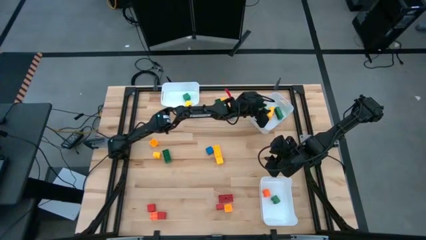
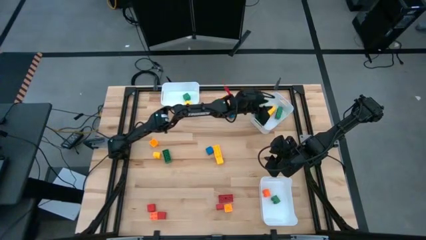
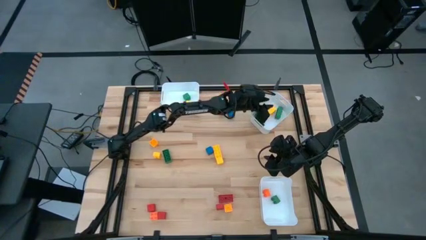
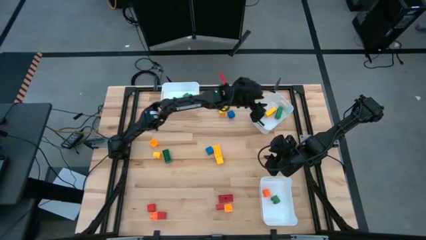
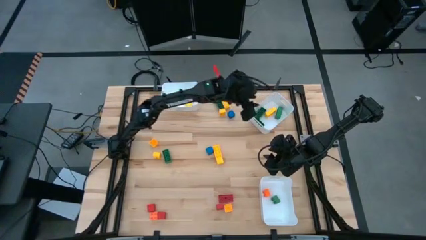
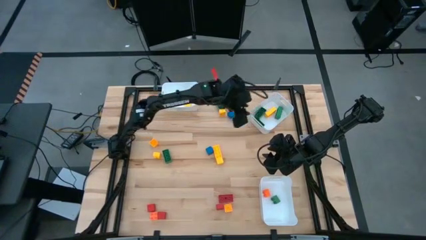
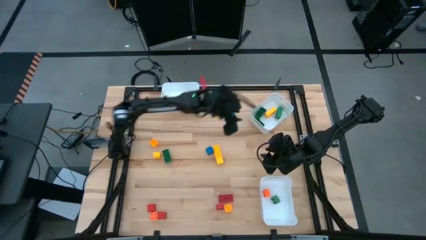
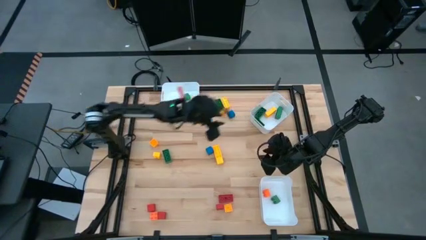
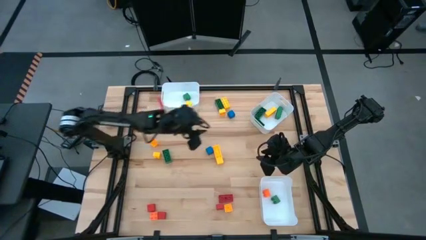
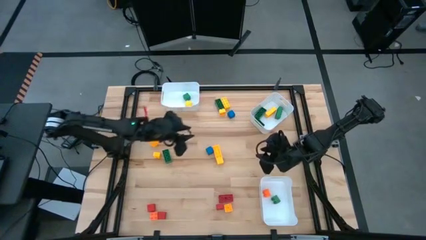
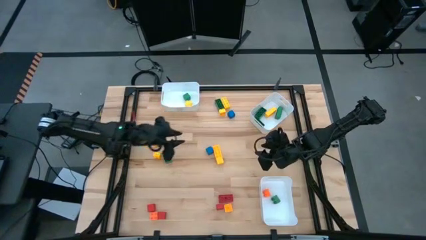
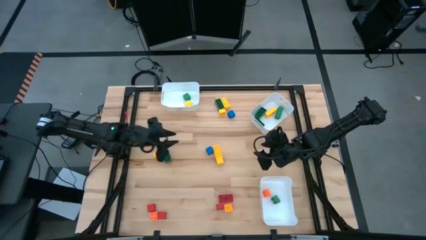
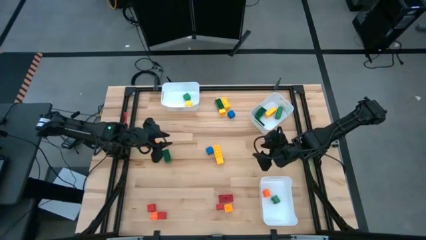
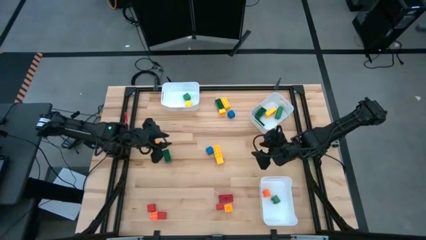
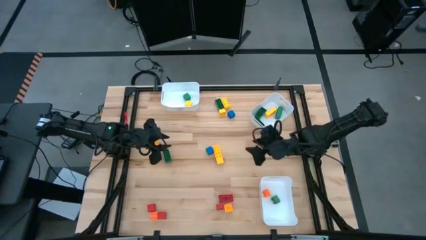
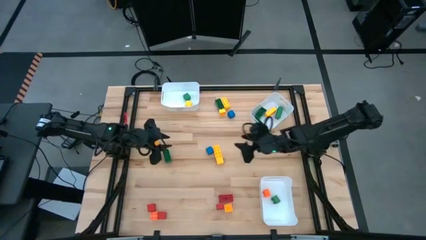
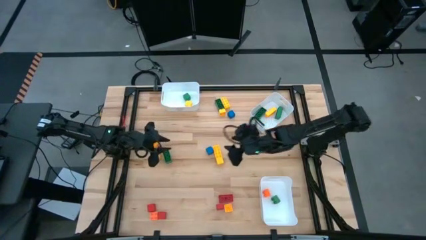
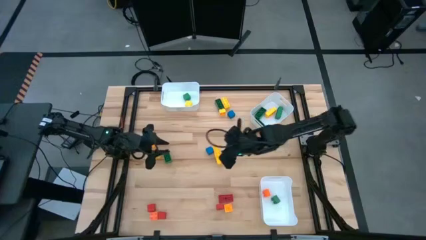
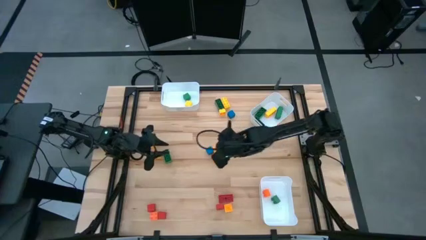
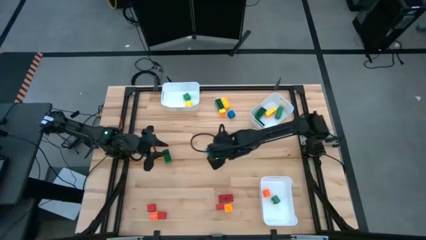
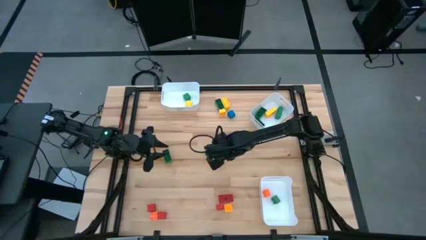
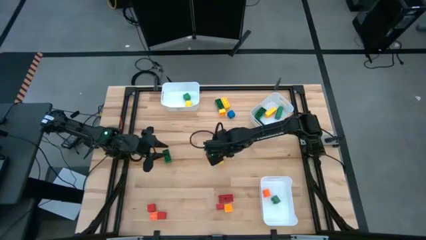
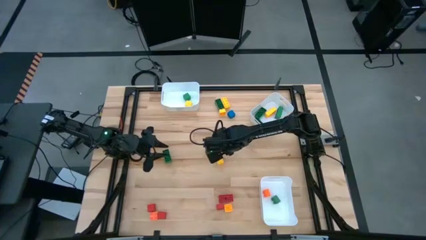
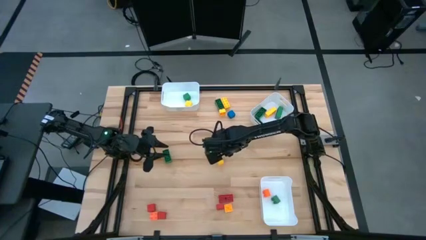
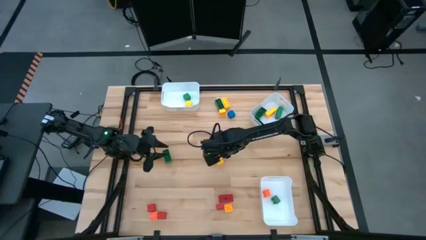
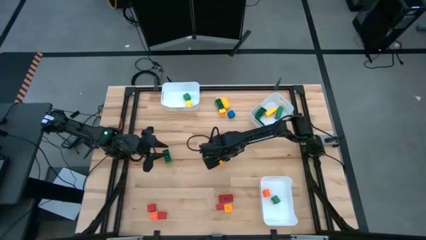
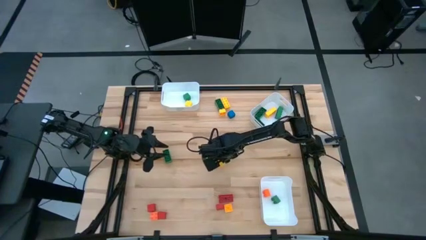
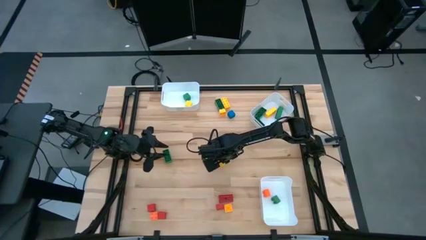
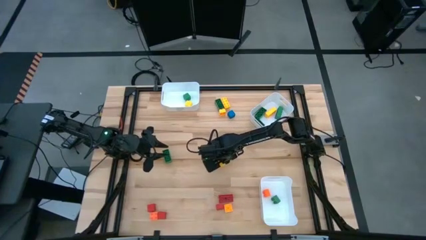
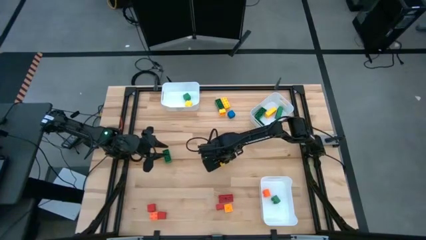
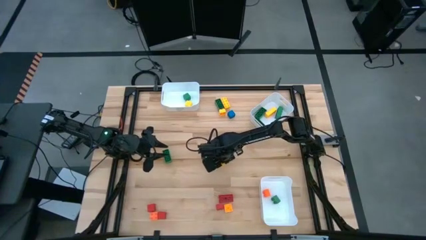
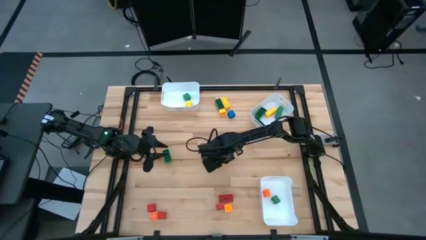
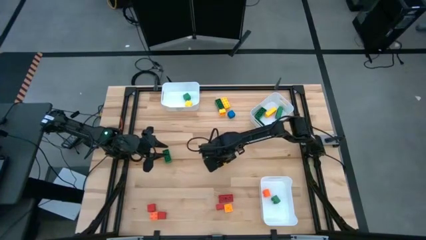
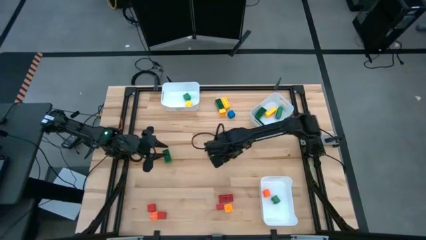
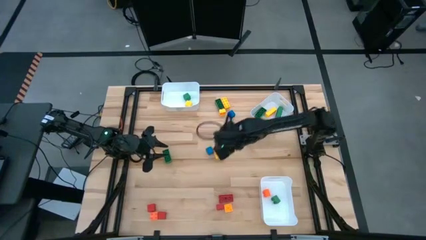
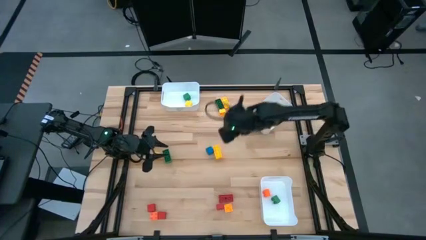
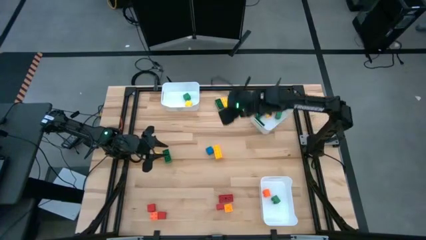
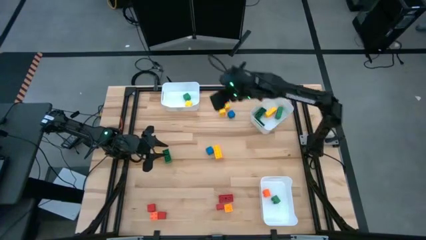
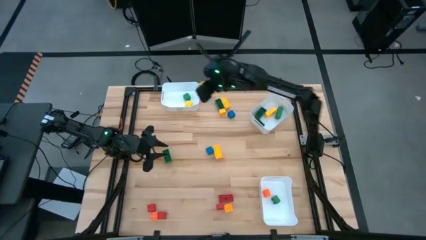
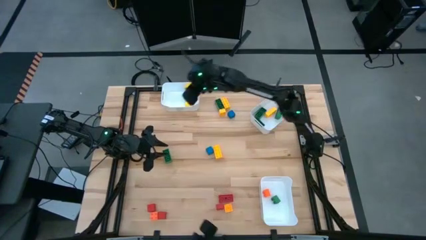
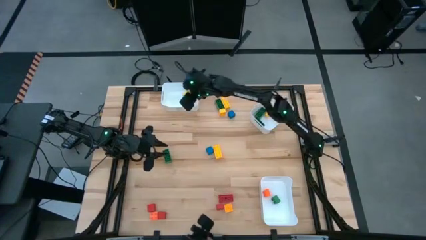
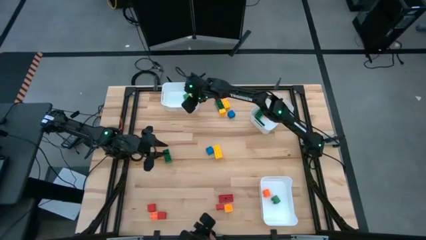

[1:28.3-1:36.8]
Task: Sort blocks by size
Put the yellow square block into the top left white bin

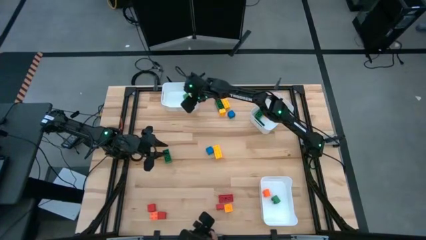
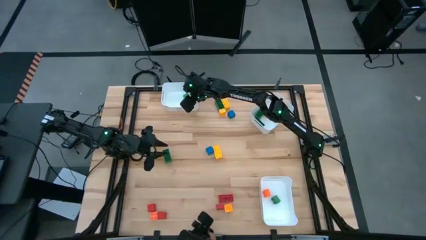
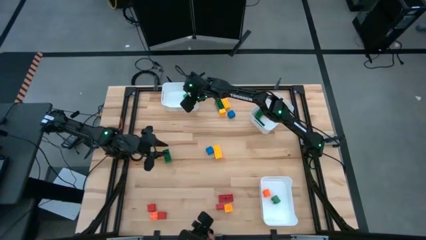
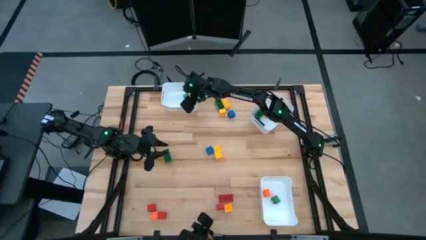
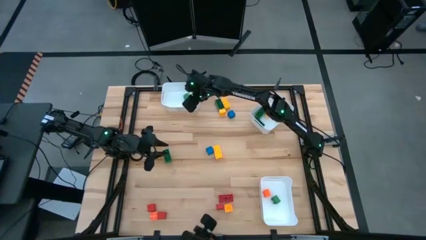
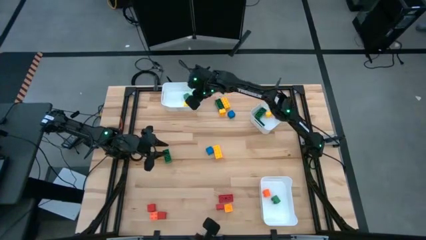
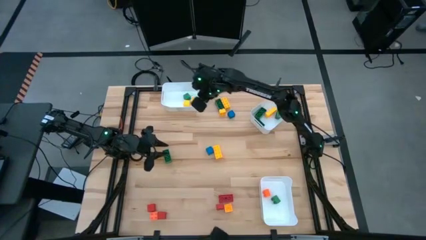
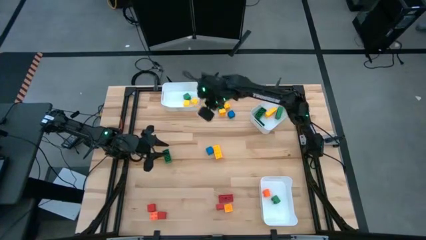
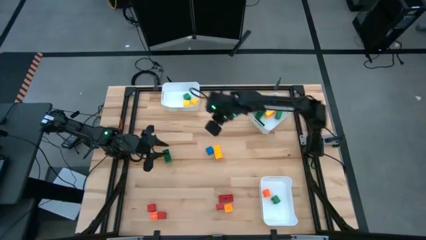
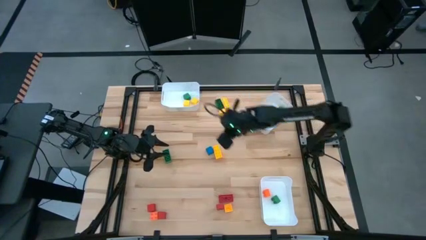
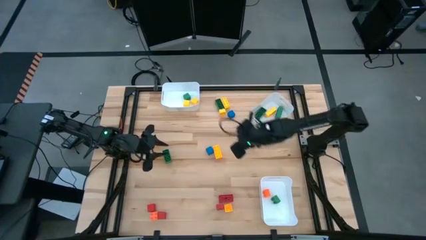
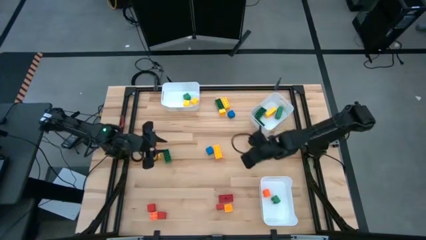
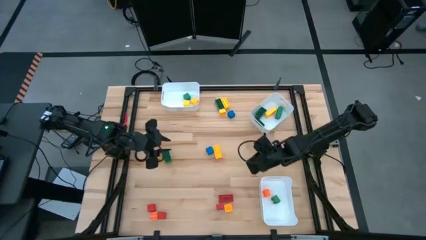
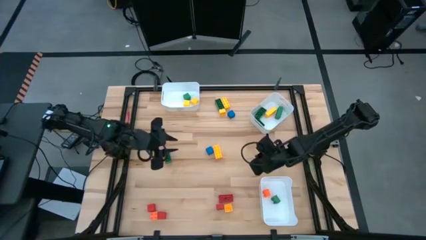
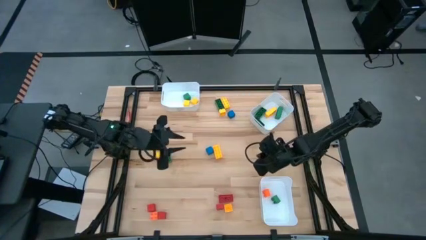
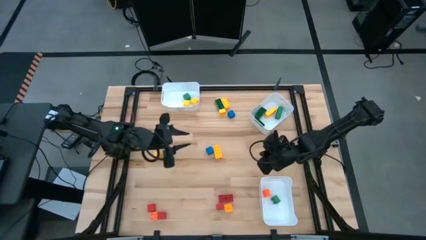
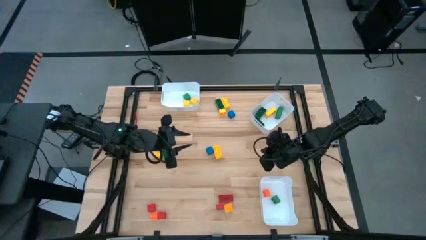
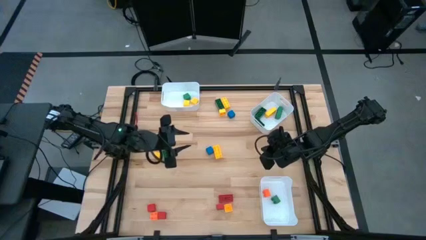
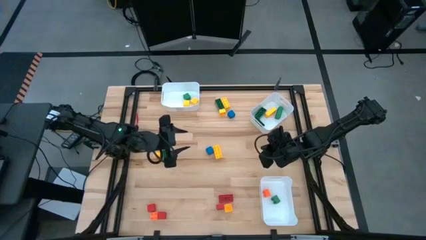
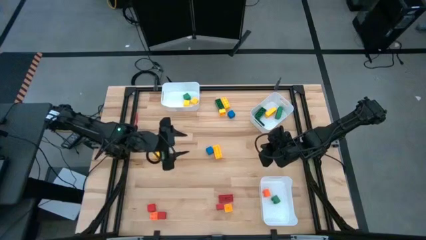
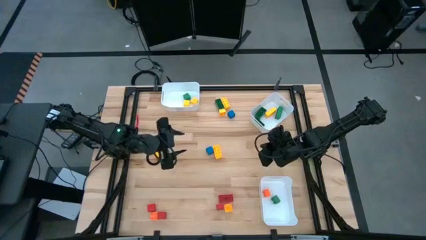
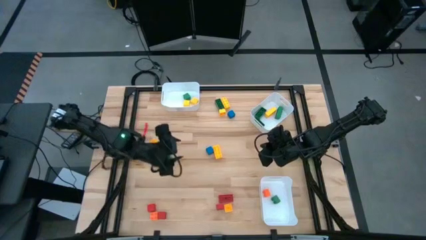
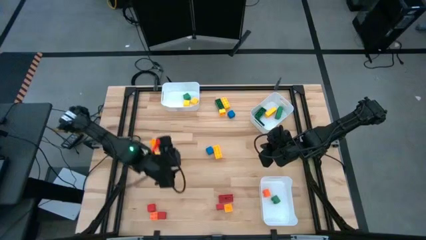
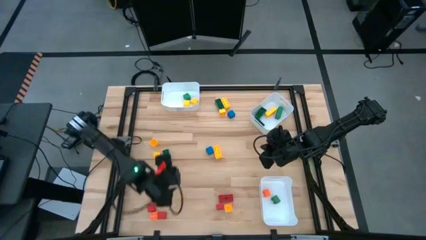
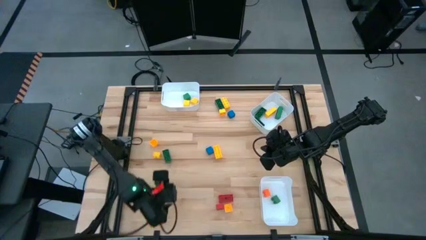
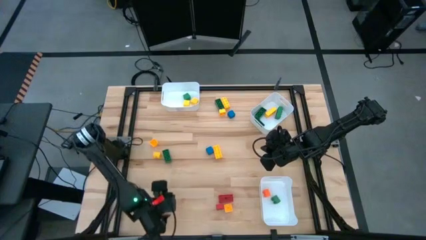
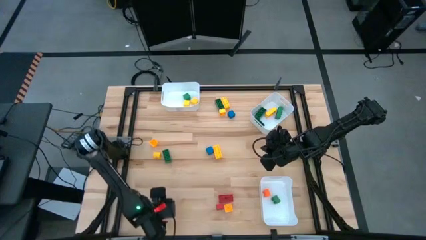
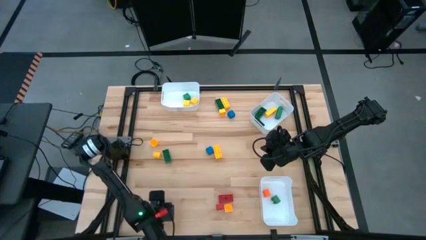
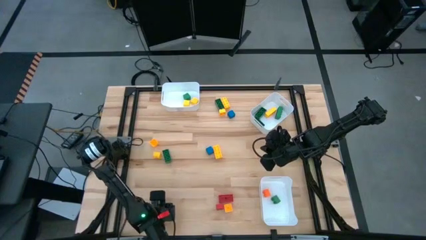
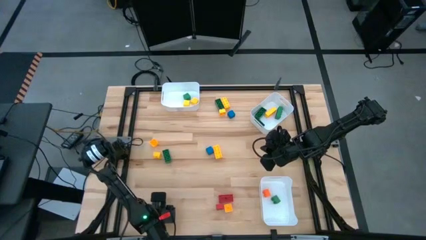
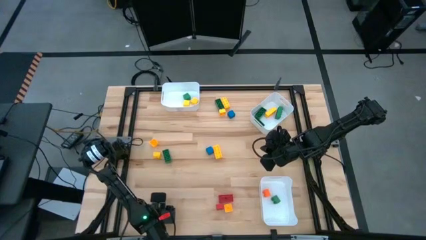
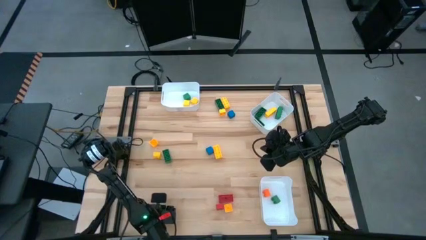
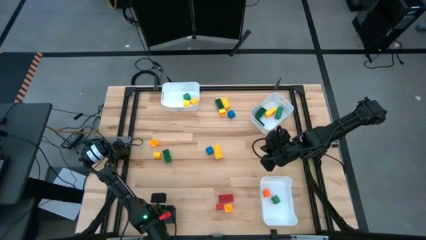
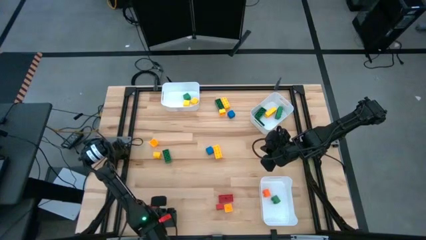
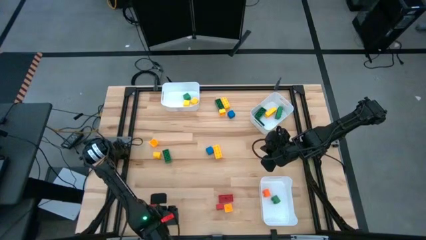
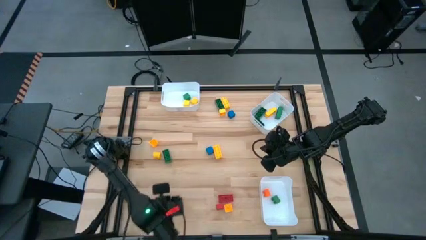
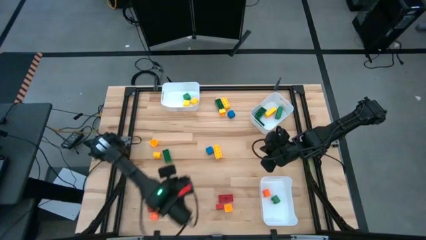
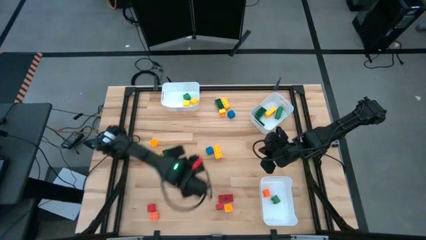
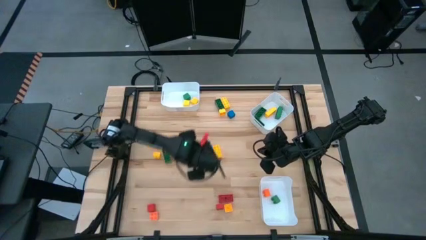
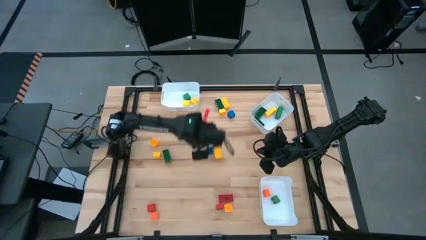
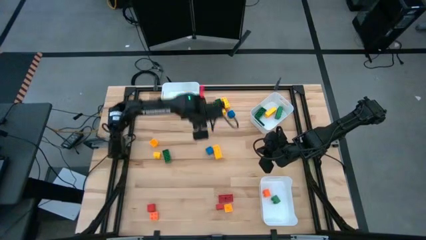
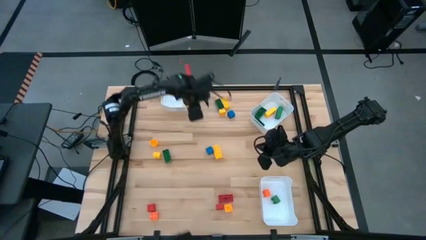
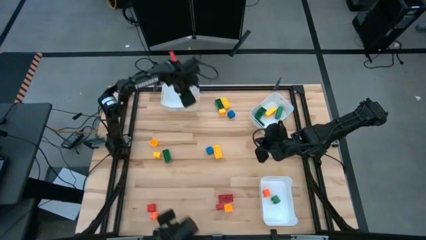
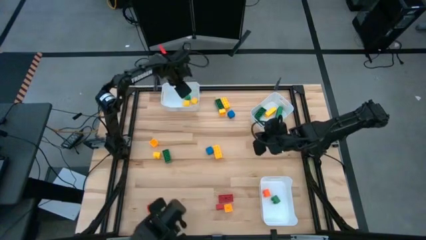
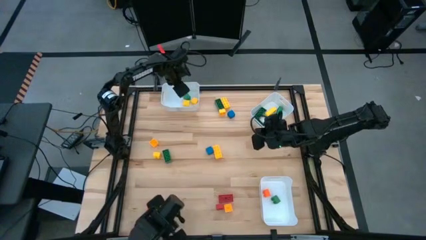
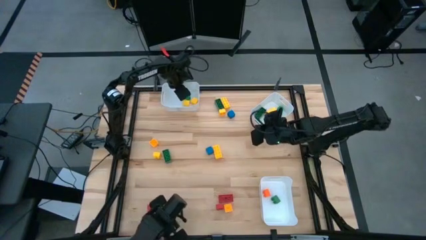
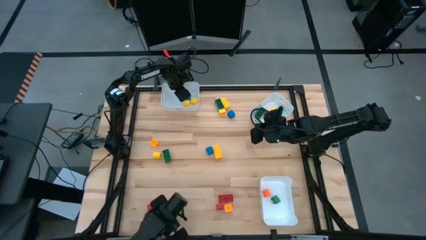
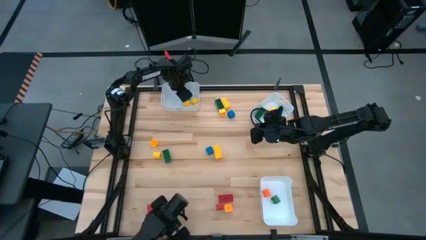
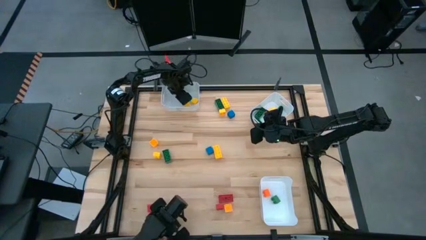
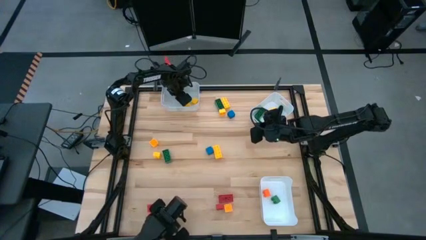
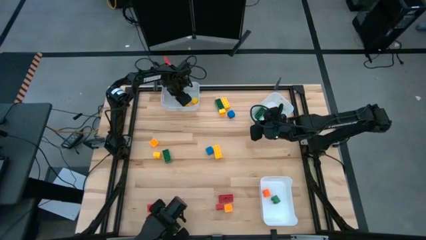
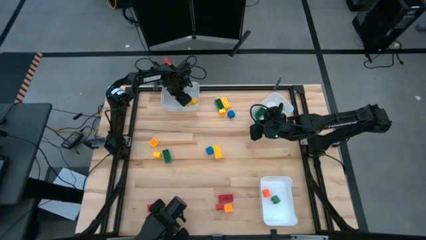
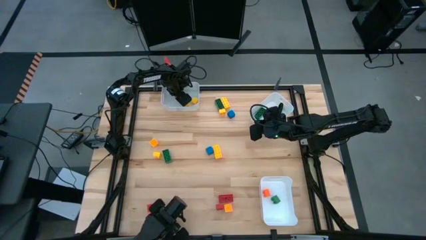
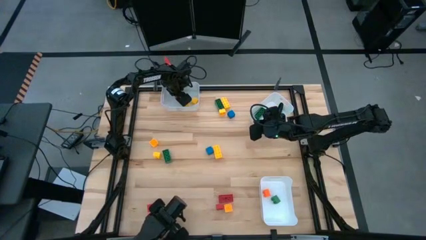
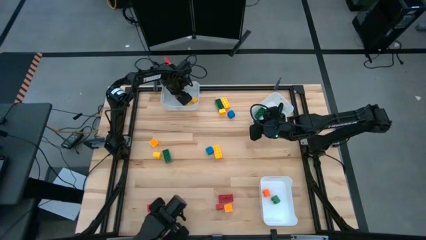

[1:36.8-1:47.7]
Put the red square block into the top left white bin
